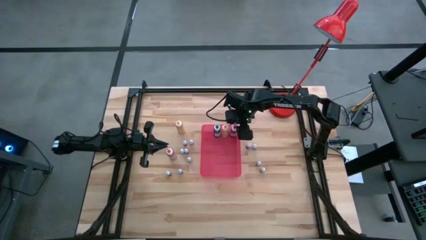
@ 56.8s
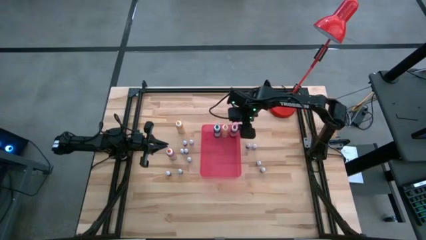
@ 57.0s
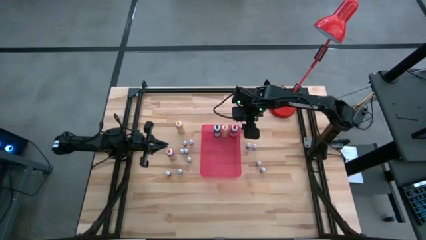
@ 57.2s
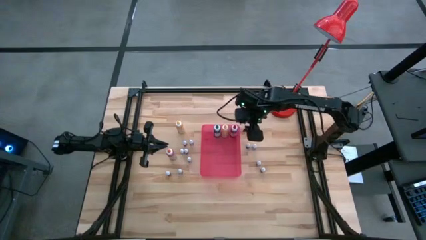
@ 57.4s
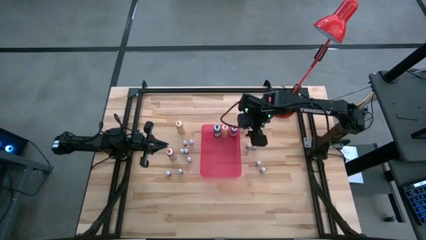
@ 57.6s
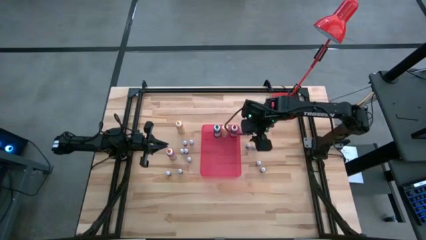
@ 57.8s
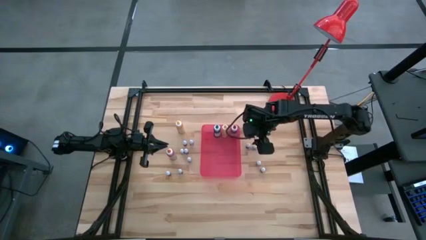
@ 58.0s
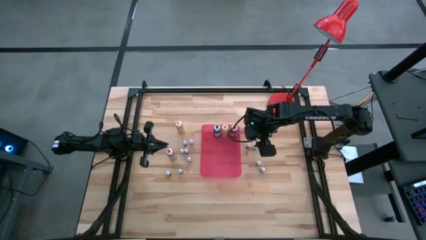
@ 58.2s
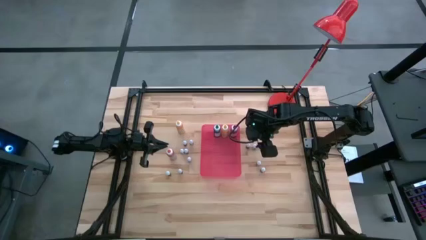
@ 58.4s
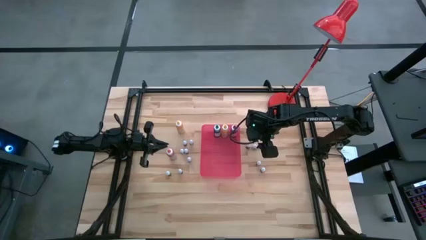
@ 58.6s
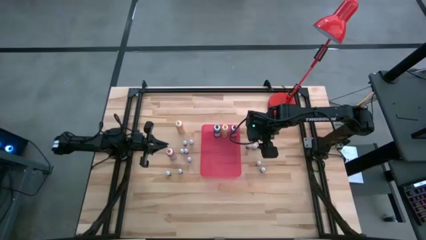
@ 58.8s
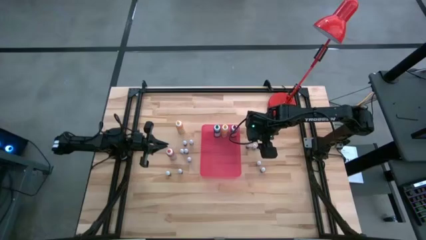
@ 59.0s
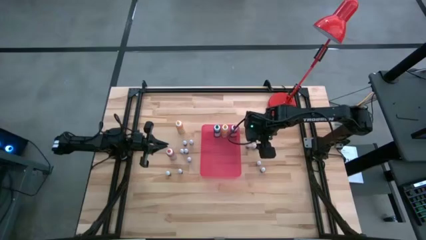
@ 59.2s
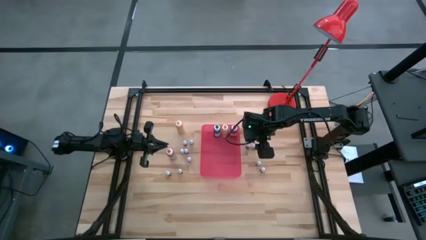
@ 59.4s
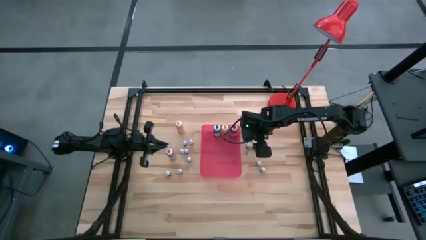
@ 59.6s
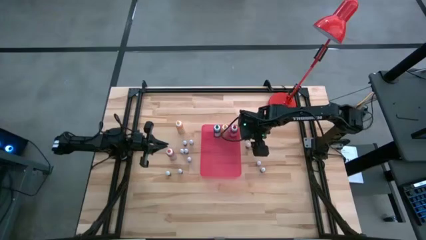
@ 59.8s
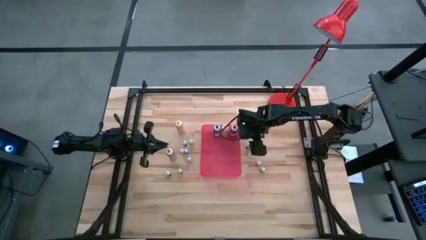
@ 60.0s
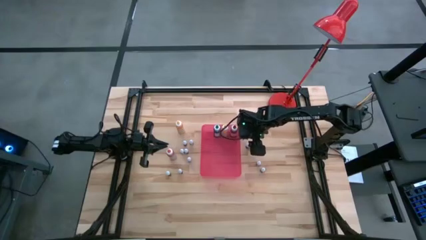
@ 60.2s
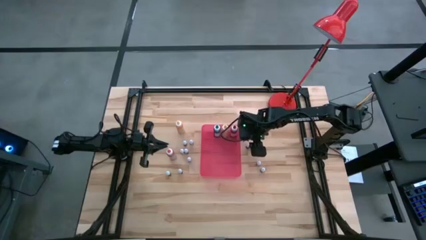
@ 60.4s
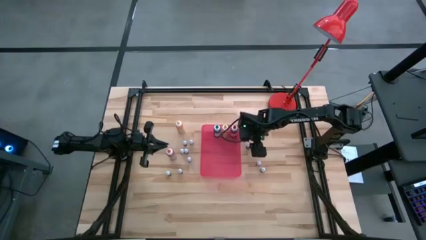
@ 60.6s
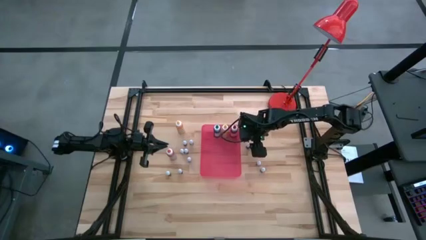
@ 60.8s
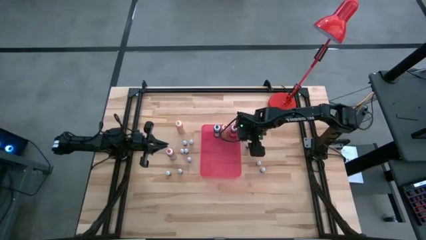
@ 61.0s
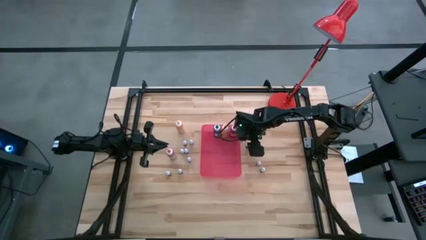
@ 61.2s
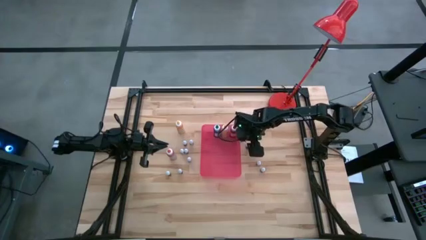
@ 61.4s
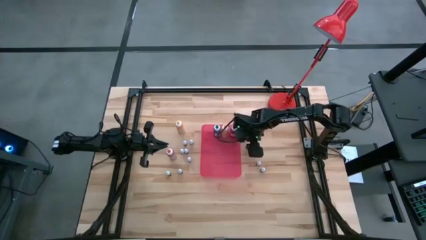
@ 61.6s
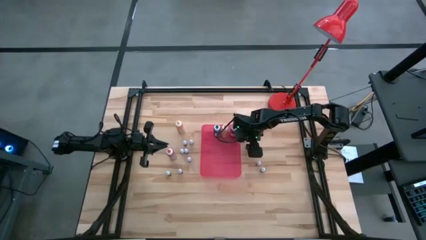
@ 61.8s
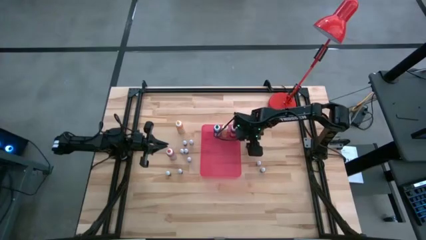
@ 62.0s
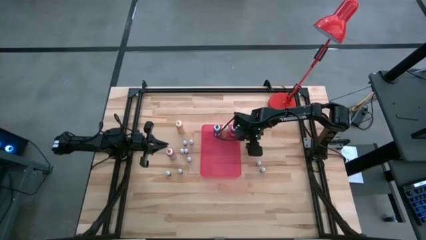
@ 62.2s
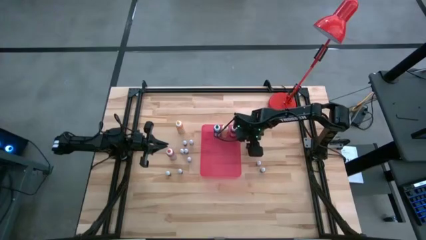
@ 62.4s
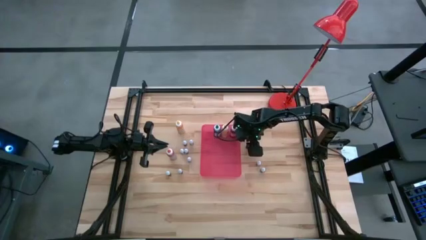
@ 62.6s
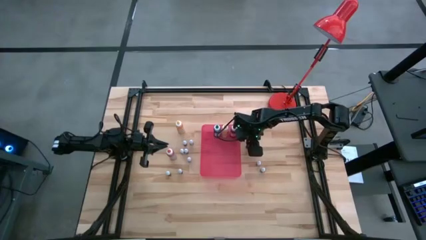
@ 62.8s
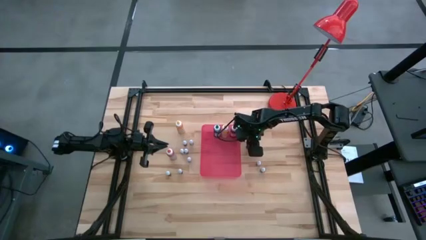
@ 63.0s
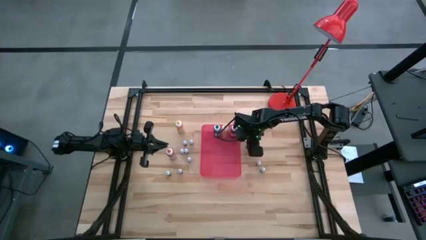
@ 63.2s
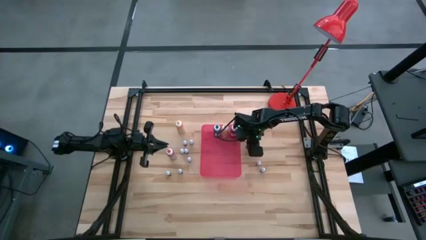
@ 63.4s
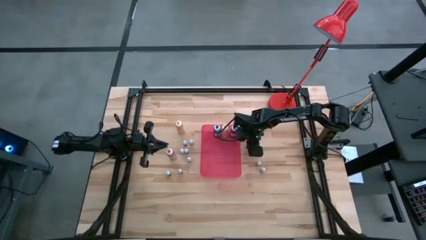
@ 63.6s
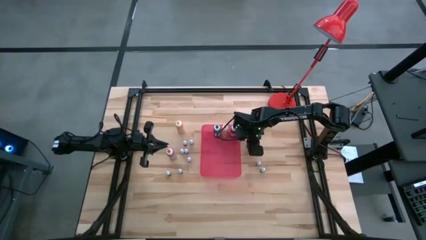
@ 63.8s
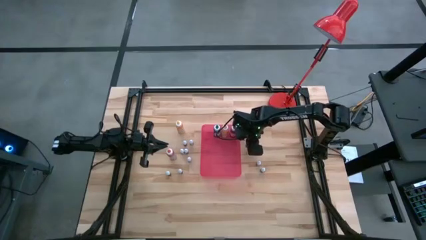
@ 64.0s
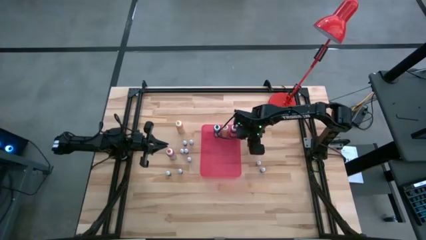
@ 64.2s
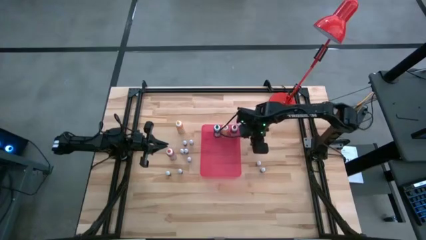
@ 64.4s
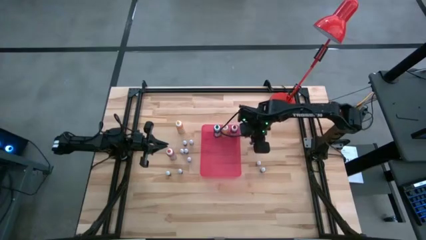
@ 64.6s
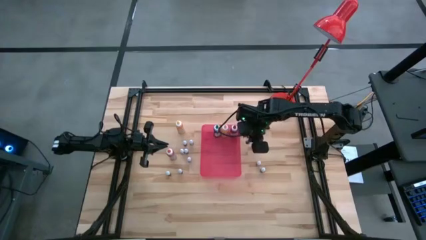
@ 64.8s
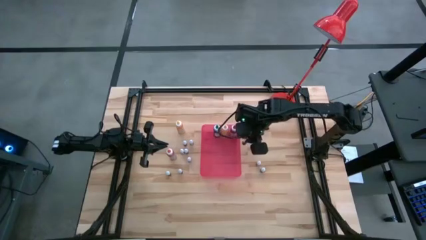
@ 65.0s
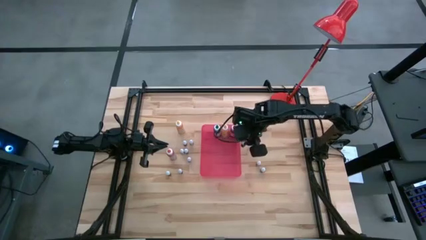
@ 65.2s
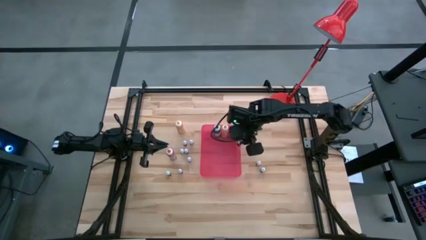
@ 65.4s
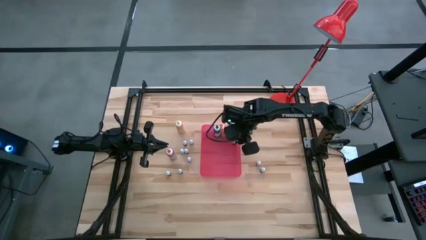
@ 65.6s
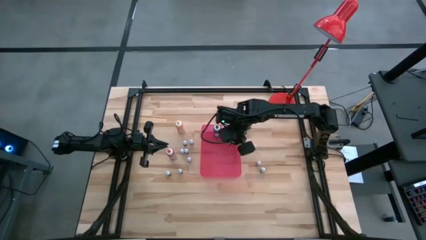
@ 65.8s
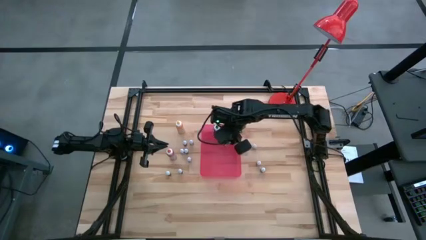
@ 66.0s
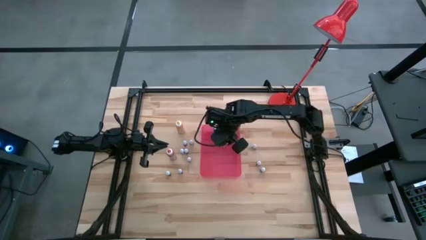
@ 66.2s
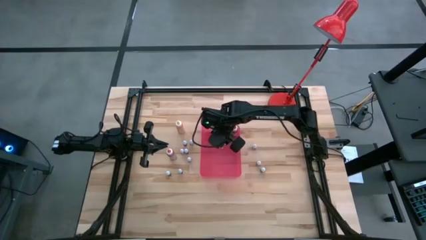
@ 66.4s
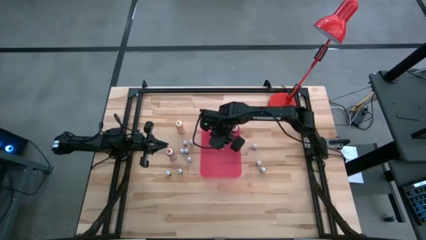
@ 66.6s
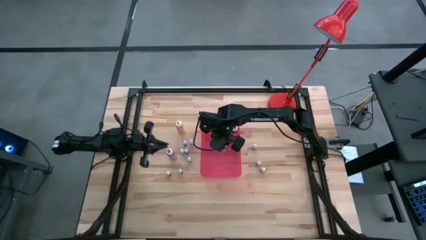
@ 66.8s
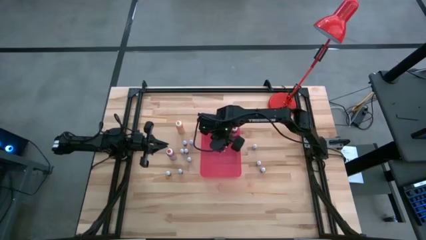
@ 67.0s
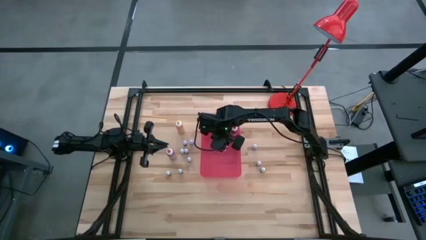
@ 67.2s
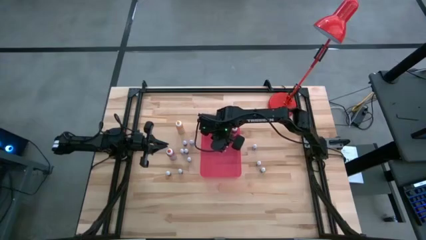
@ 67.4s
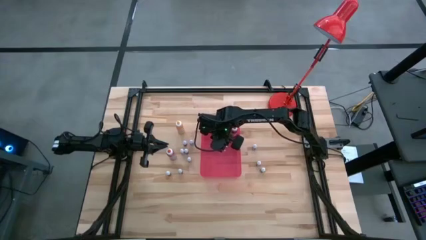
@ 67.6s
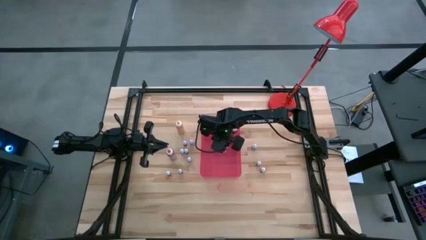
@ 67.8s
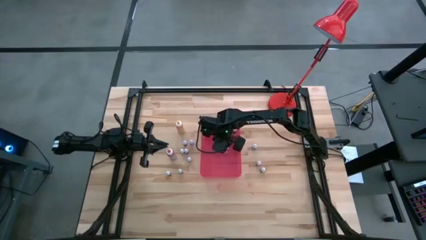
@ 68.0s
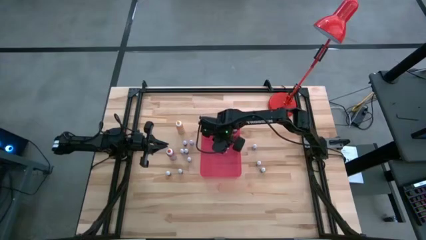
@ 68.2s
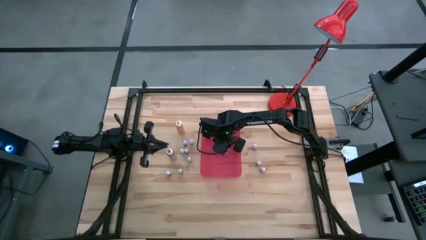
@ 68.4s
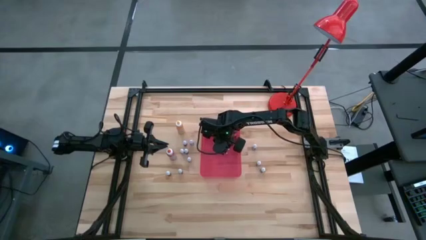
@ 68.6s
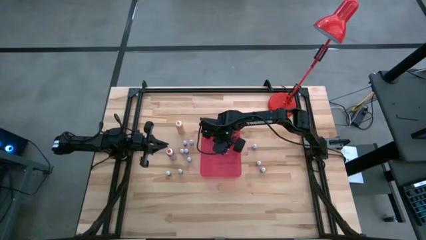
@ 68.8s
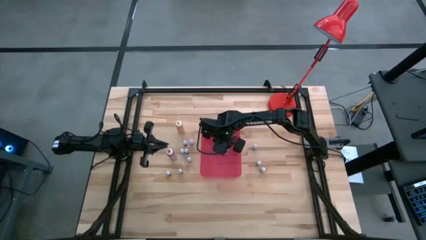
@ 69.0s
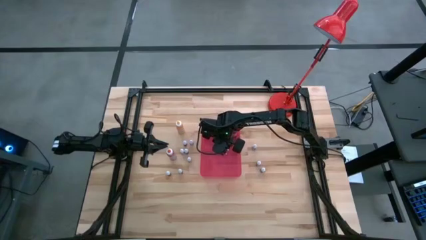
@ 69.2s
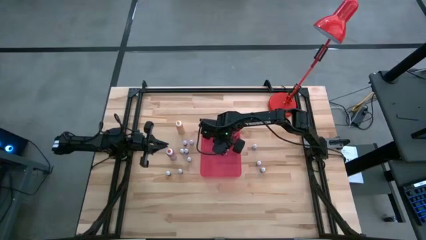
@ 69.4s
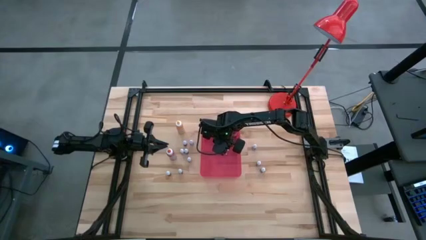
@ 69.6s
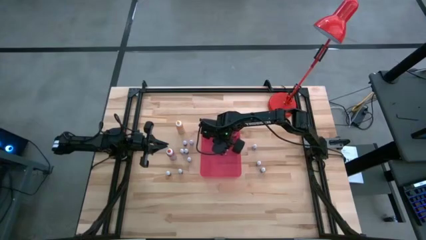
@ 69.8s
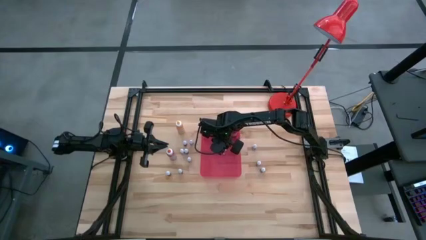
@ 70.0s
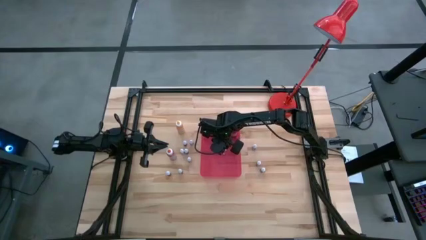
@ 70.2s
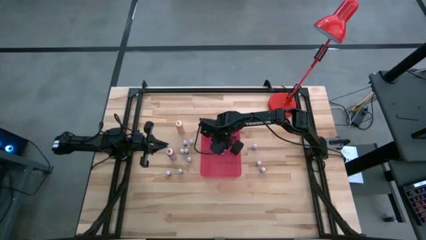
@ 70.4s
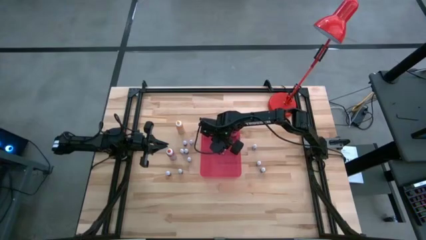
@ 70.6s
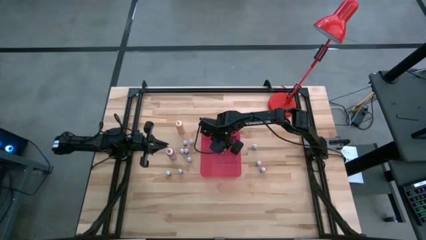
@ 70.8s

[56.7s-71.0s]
Task: Pick & Place food coloring
Put the small food coloring bottle into the red bin

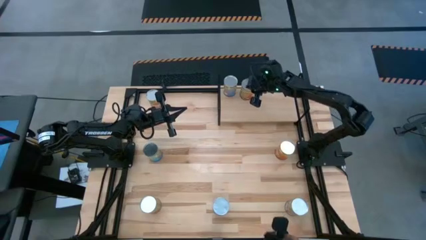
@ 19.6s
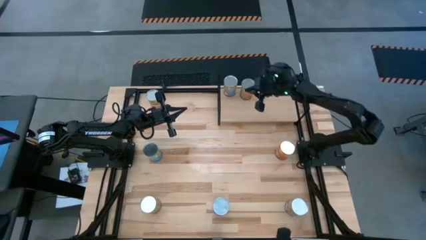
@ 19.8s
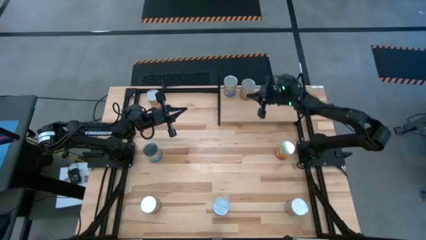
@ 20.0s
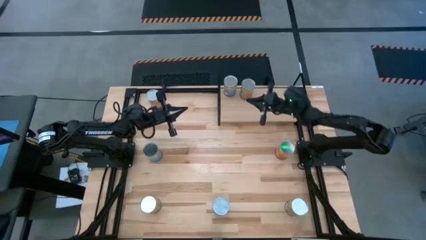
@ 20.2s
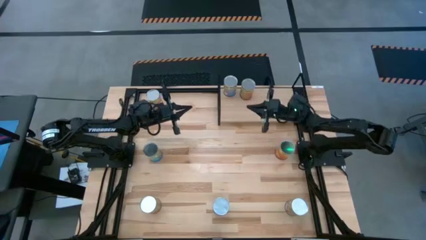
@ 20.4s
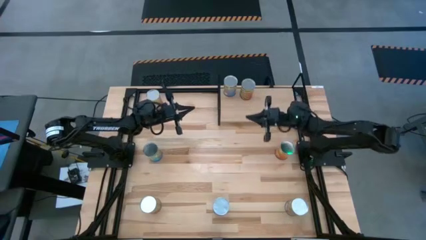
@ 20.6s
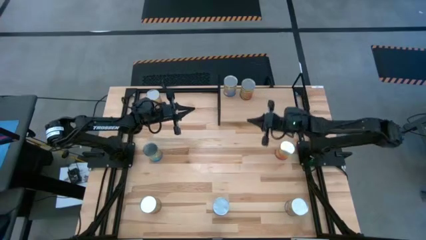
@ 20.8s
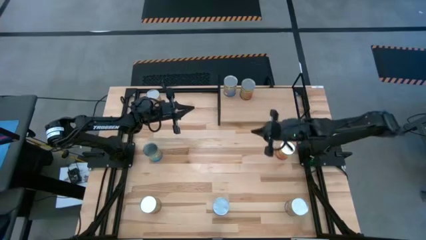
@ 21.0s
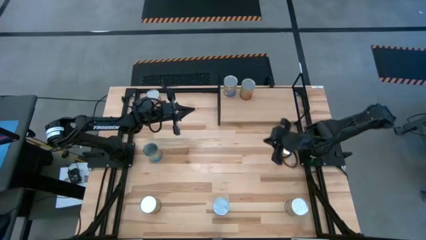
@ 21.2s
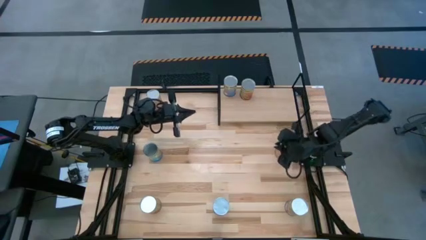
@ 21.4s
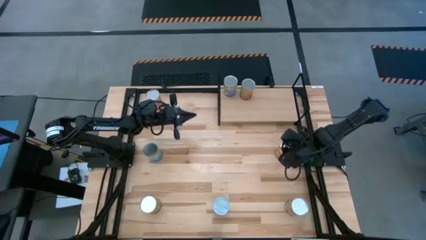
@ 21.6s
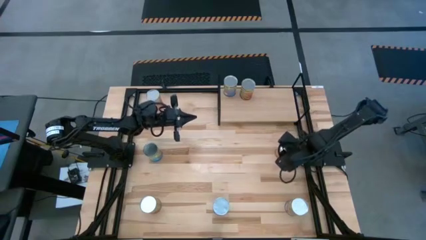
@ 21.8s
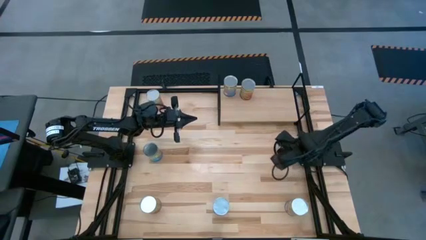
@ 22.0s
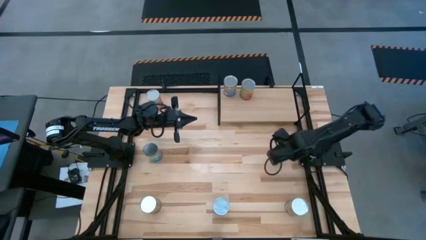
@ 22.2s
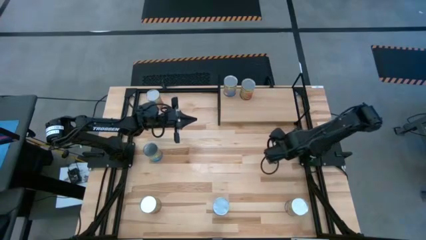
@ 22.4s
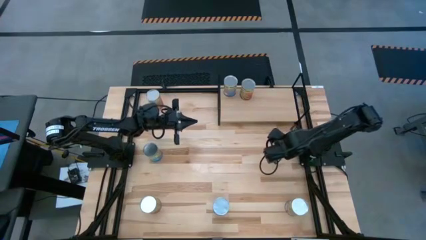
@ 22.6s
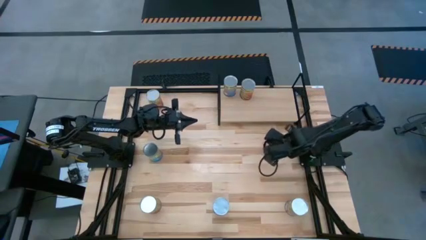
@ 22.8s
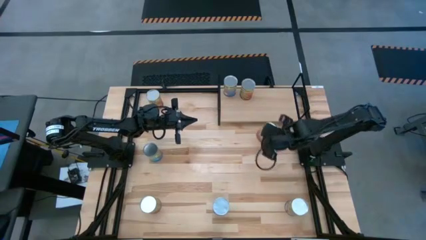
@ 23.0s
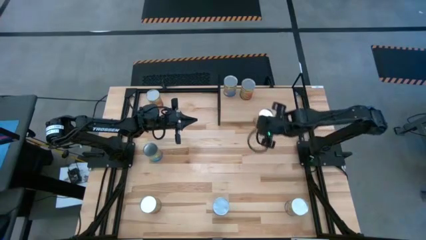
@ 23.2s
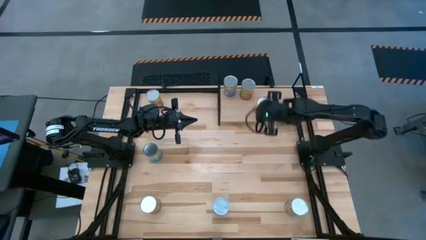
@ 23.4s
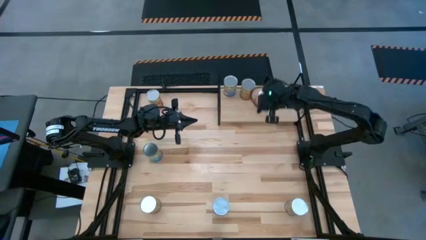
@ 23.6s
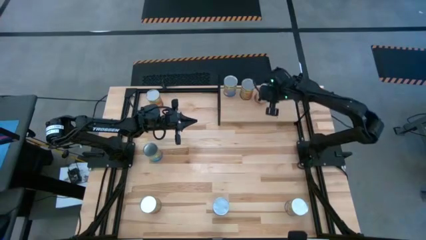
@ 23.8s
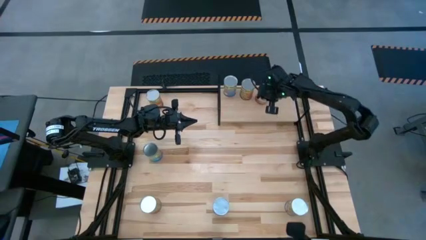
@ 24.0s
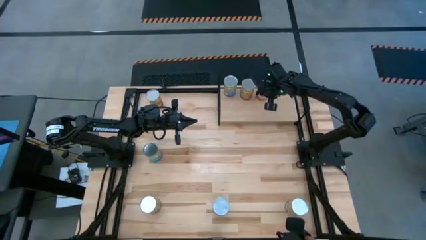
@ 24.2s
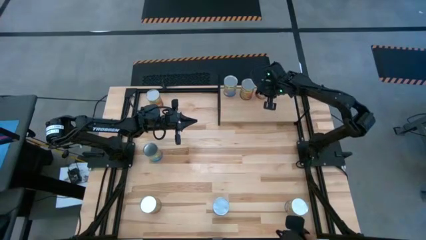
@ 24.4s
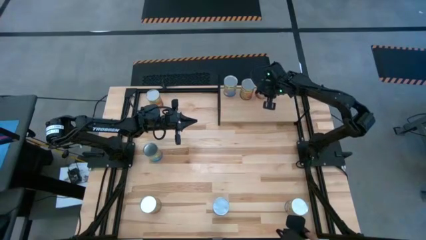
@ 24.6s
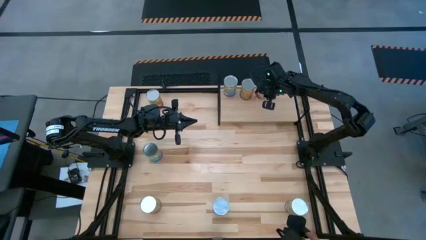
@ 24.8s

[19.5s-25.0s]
Task: Pick and place cans onto a shelf
Put the canned corn on the shelf
